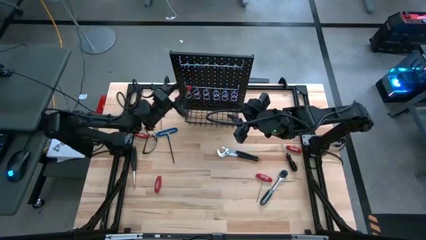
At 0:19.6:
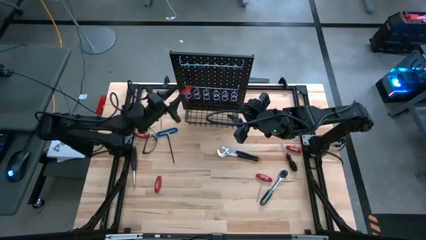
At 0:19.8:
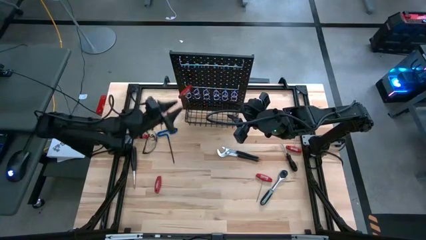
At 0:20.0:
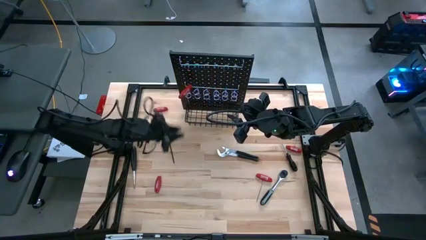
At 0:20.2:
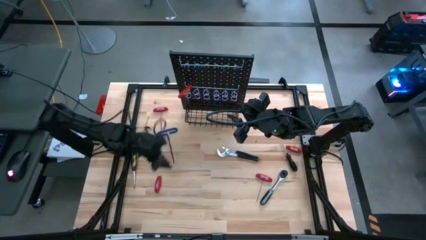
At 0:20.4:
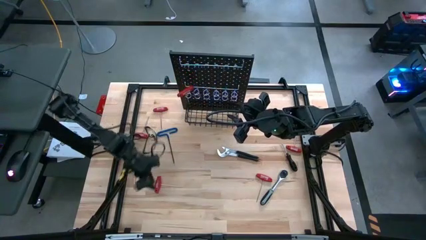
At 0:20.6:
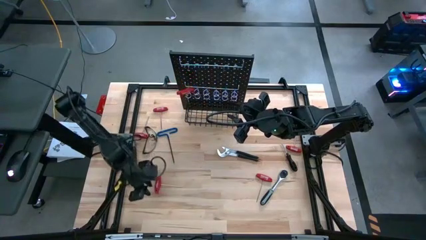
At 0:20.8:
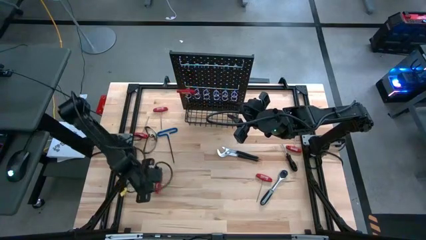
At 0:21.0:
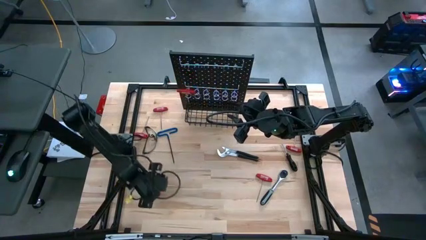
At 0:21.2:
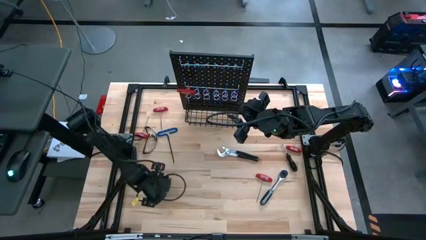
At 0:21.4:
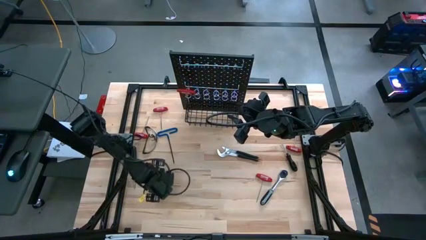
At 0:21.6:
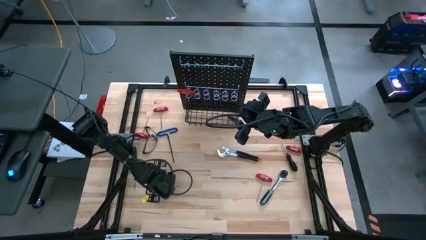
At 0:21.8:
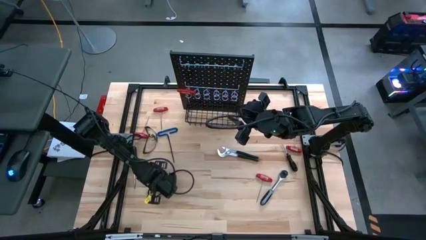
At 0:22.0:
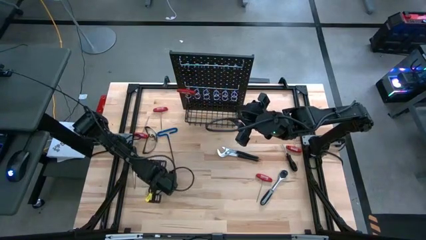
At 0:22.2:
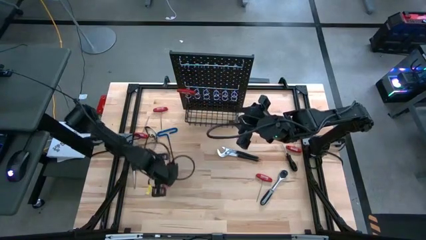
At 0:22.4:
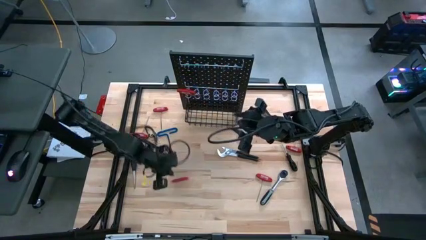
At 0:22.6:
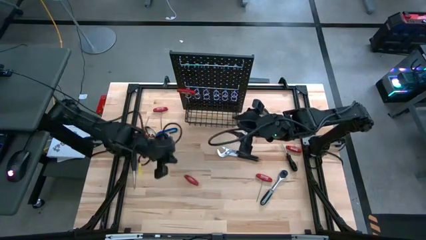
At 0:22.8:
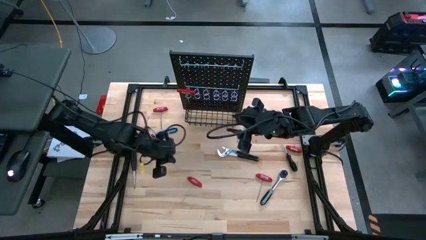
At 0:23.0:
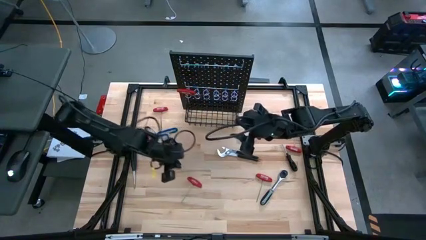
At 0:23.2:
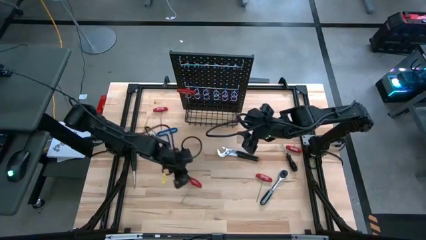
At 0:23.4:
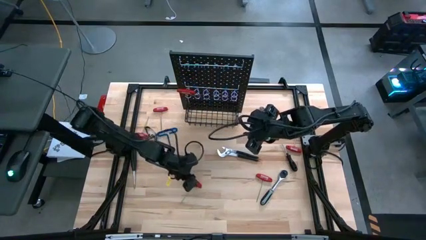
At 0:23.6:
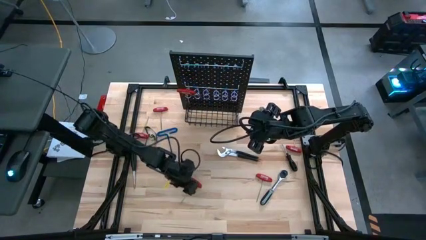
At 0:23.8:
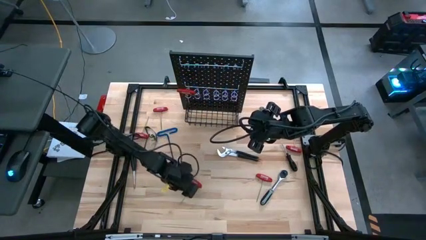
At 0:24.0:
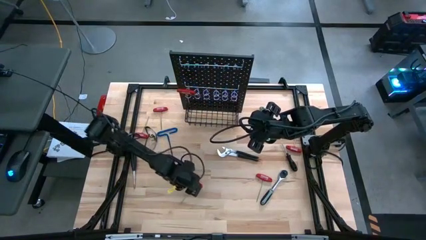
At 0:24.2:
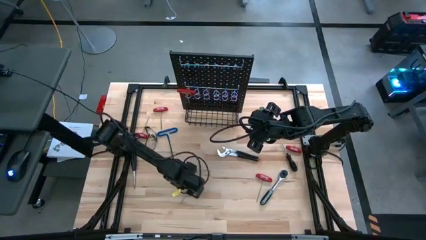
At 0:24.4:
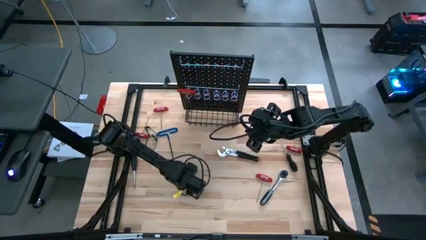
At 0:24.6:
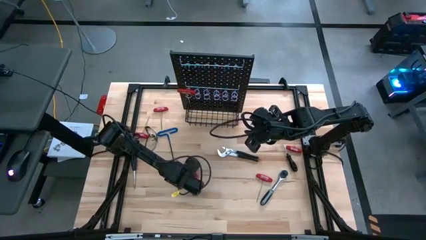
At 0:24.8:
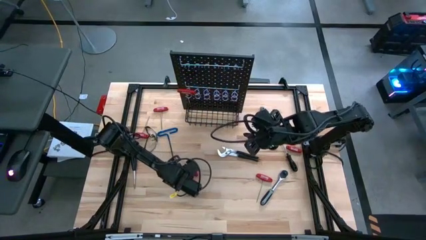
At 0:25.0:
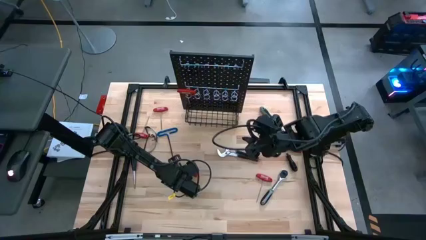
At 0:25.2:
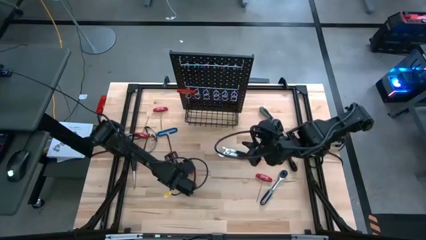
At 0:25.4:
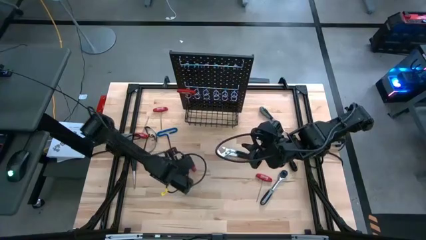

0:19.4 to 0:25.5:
Task: Hang tools onto peg board
Hang the bottom left red allen wrench on the pegboard

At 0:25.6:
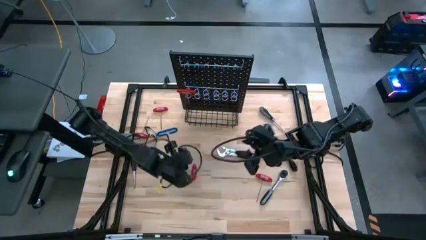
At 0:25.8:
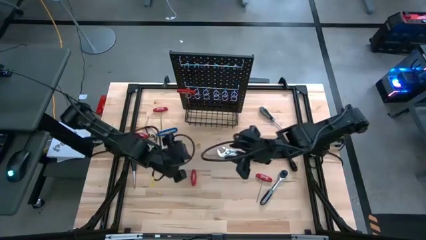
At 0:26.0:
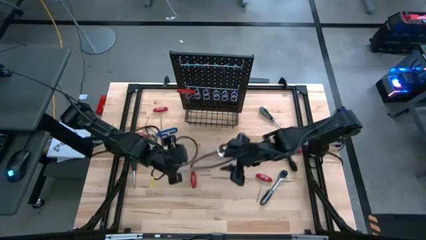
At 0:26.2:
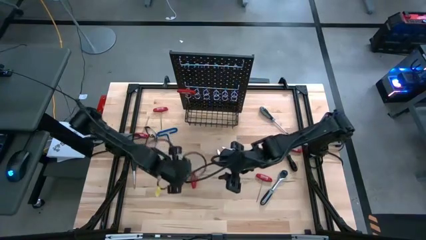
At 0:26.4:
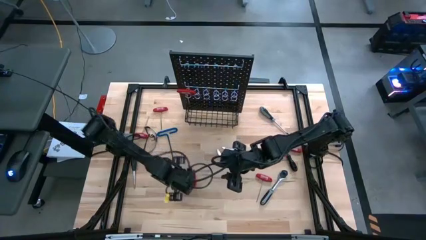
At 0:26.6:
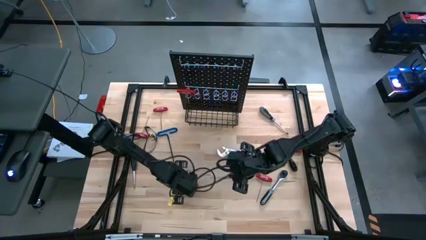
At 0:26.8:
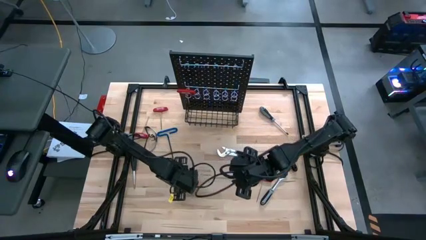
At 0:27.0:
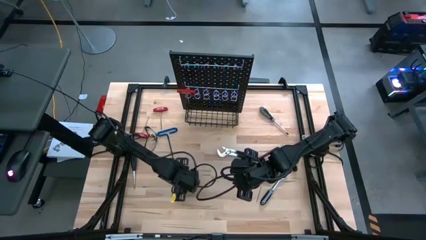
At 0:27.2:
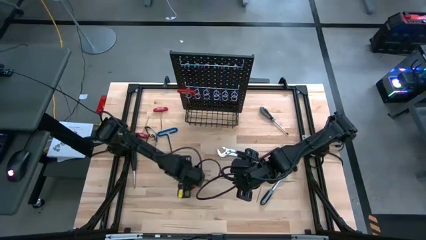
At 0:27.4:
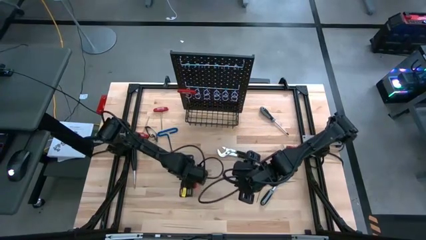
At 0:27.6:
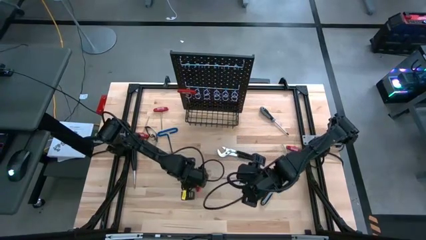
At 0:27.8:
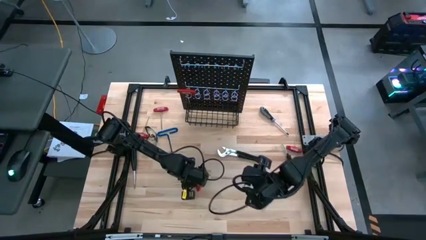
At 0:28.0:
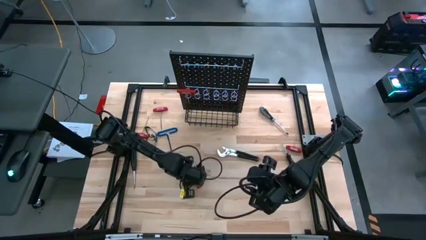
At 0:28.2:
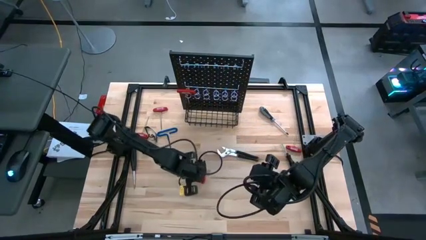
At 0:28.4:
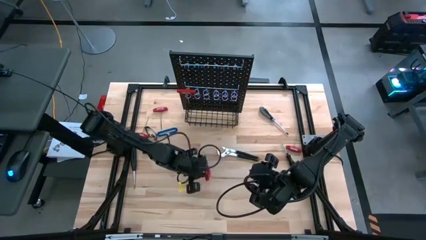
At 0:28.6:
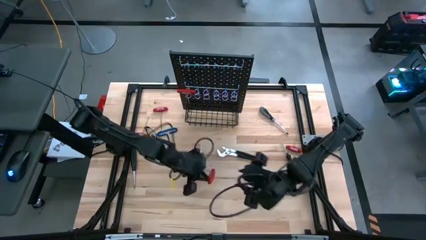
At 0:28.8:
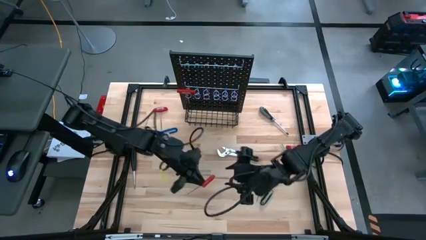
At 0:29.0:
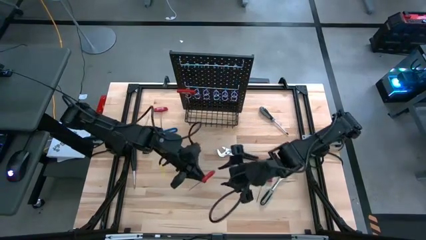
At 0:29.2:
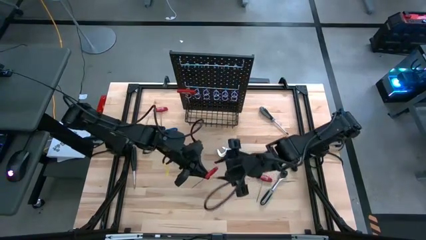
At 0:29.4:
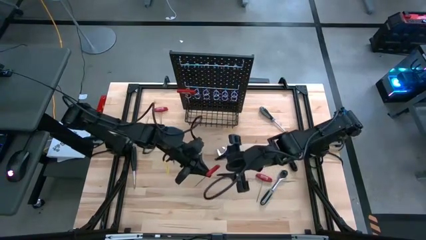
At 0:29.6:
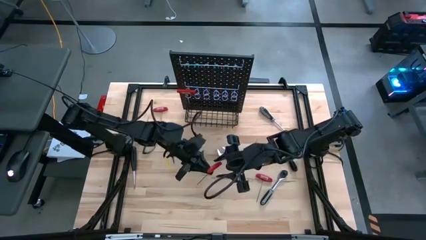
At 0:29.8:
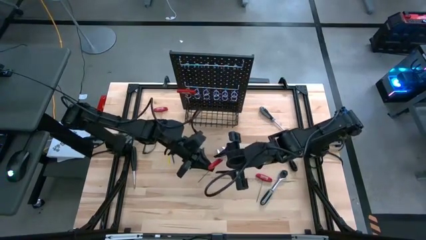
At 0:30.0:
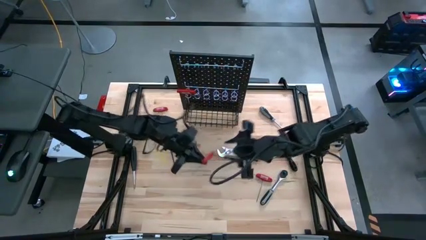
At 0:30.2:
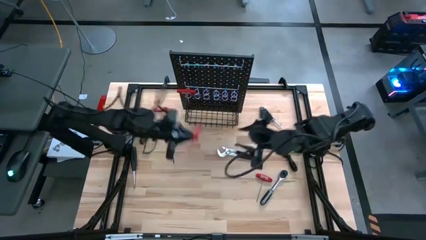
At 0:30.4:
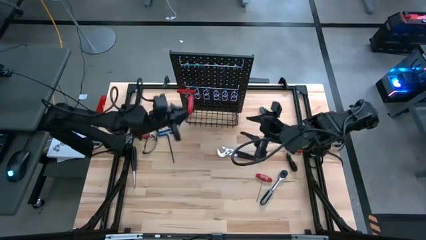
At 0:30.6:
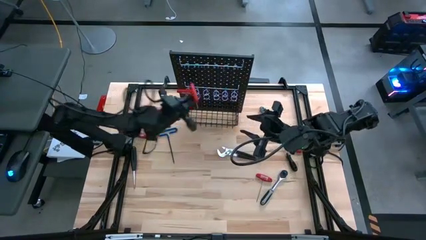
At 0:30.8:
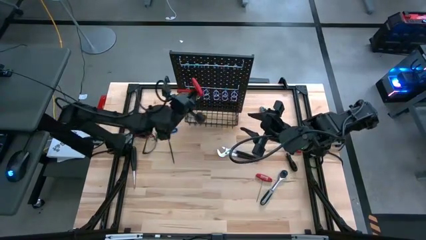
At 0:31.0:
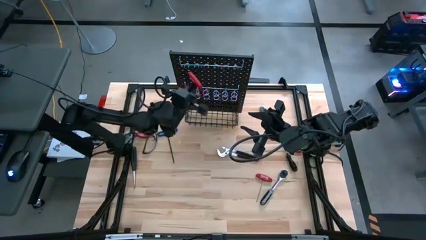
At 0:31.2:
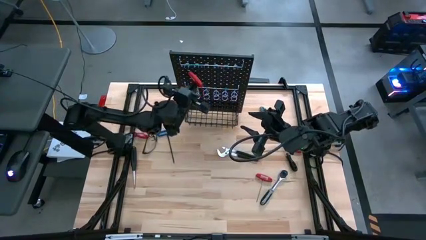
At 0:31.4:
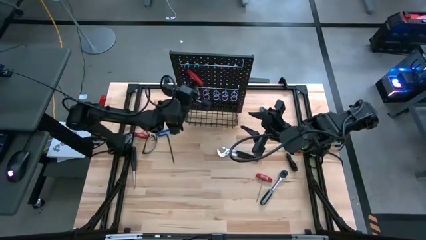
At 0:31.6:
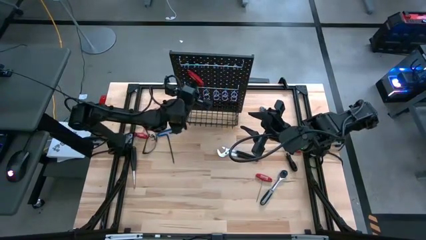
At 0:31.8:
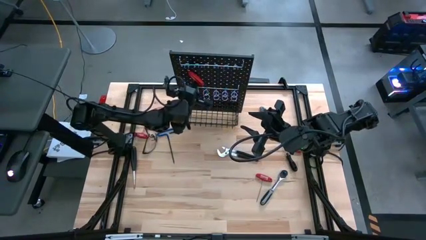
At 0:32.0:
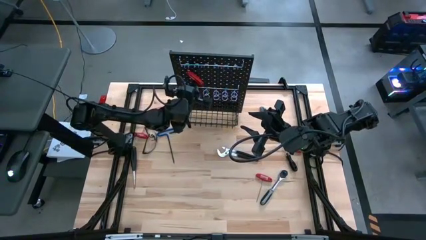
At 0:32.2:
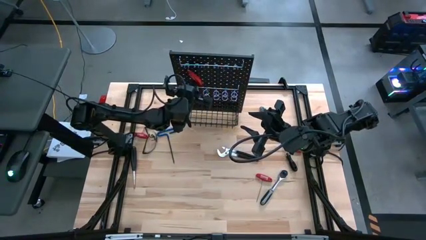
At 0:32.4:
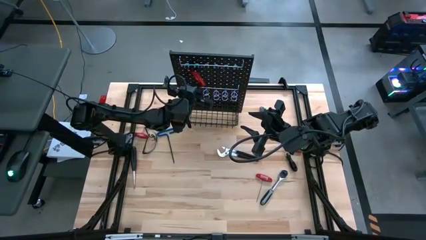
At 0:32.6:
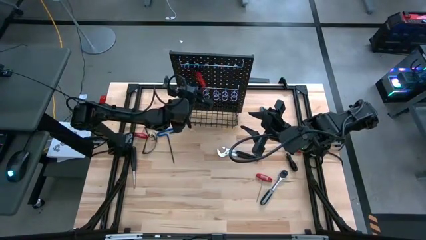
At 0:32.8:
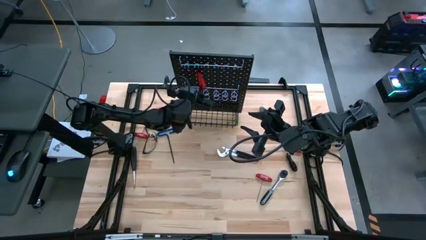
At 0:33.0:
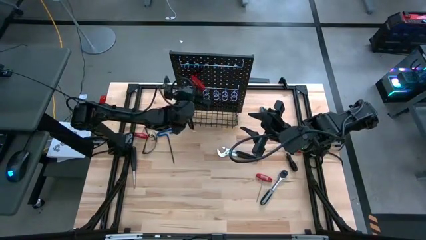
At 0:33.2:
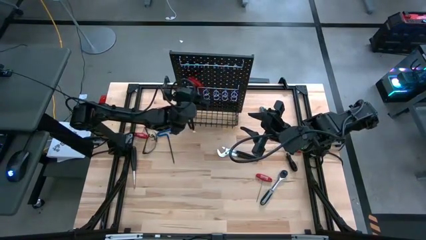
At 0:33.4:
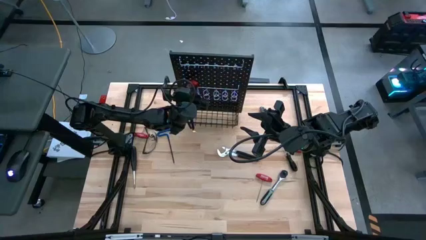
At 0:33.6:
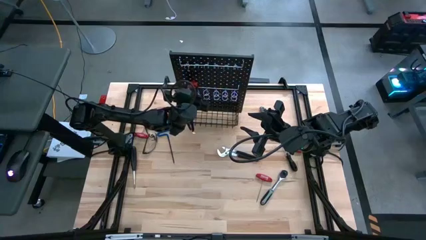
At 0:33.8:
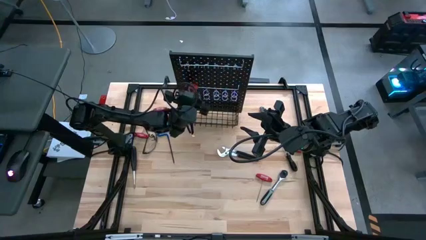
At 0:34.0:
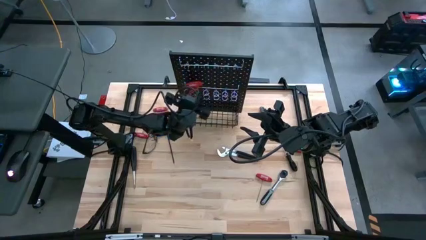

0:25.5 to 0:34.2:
Hang the bottom left red allen wrench on the pegboard

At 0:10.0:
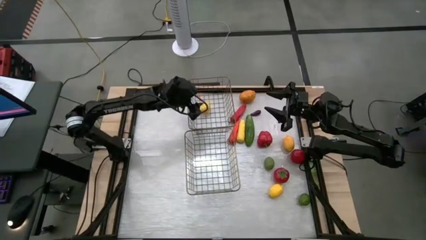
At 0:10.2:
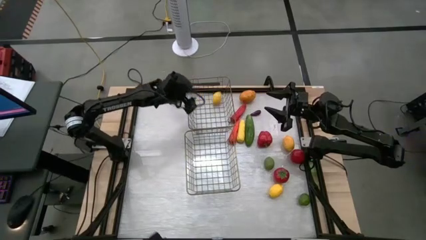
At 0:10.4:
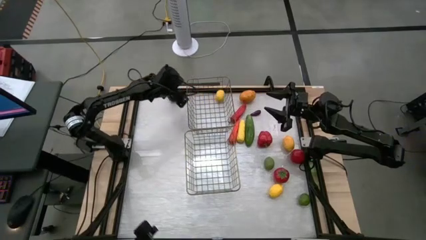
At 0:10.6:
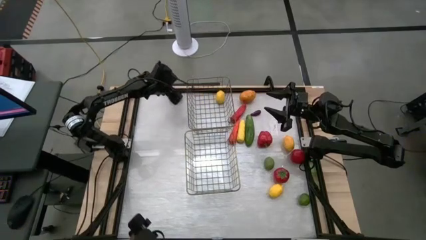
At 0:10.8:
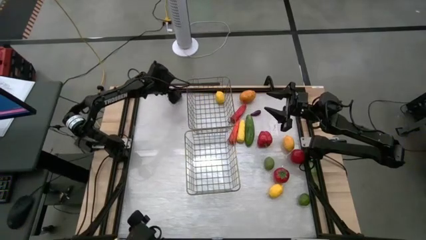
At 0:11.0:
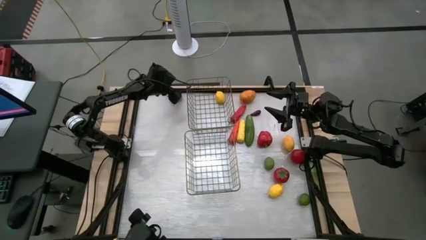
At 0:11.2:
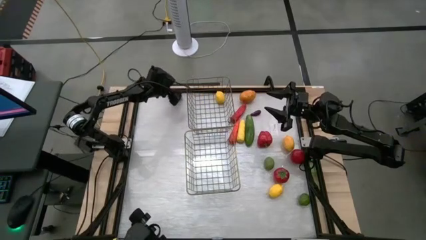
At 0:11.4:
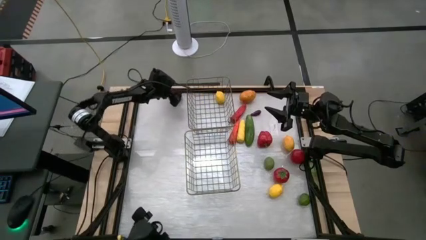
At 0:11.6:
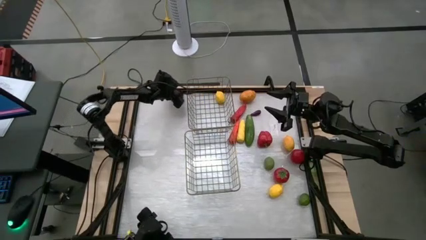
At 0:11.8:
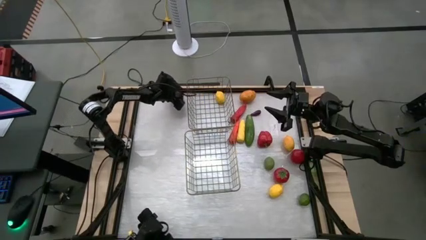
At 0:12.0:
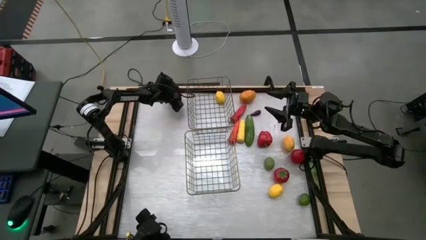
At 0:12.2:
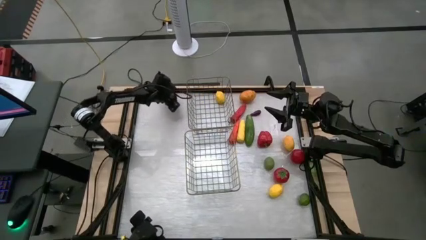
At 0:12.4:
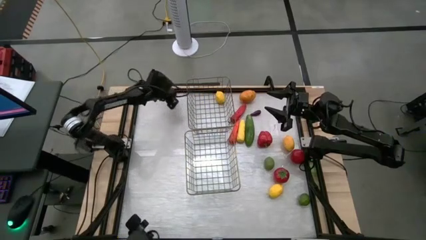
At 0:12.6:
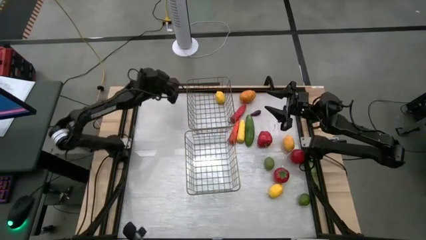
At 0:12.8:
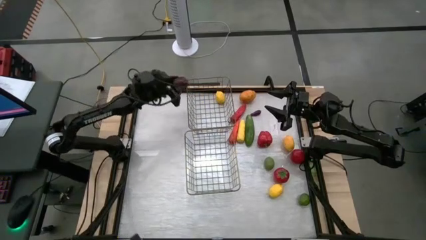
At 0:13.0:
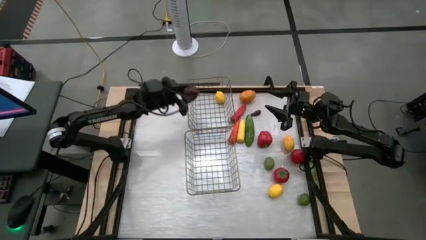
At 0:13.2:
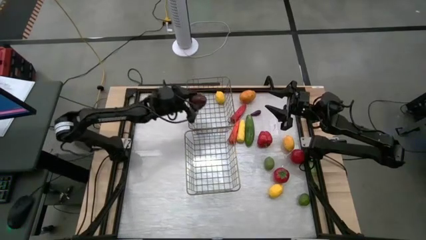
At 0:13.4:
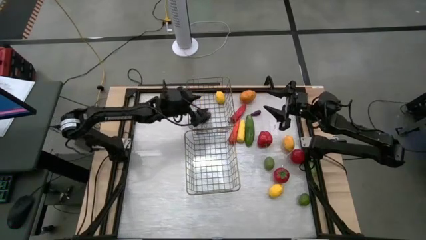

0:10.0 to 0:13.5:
Task: Sort produce into baskets
Put the dark red apple into the top wire basket
